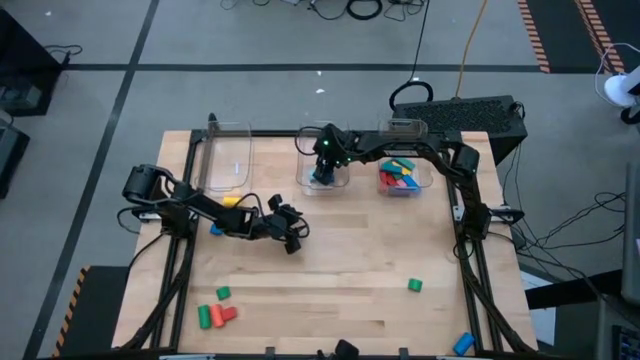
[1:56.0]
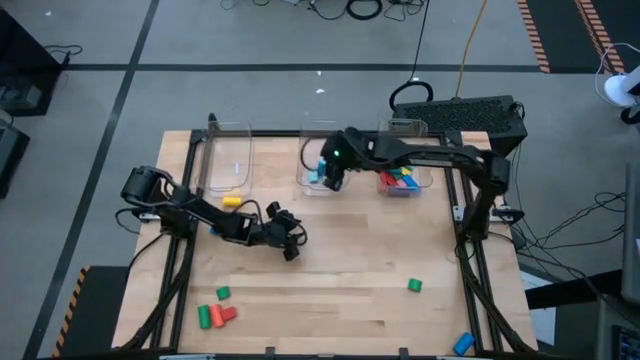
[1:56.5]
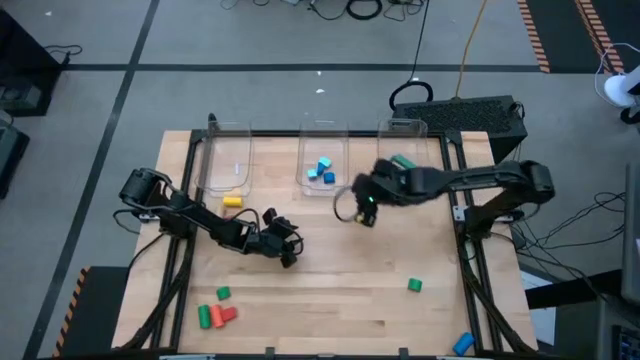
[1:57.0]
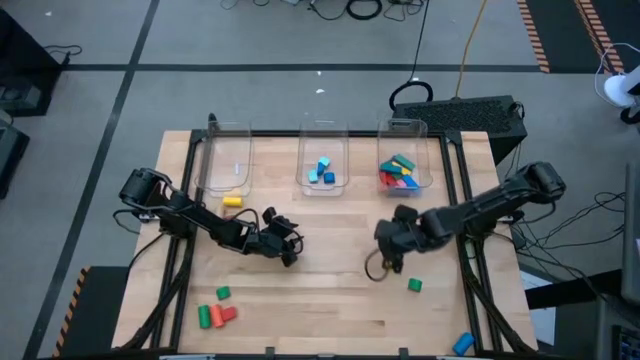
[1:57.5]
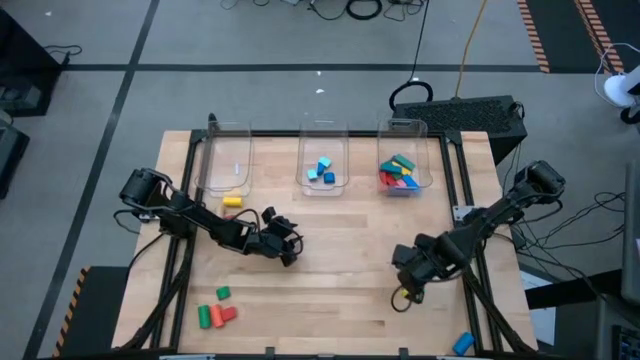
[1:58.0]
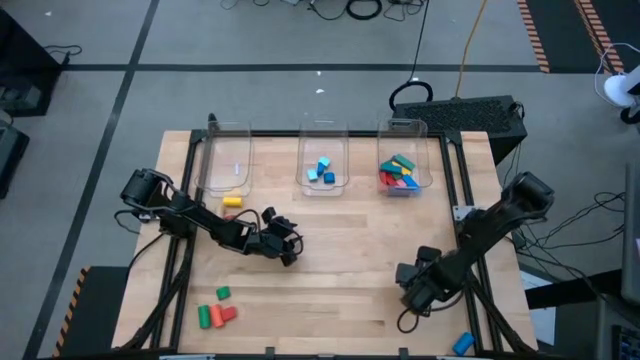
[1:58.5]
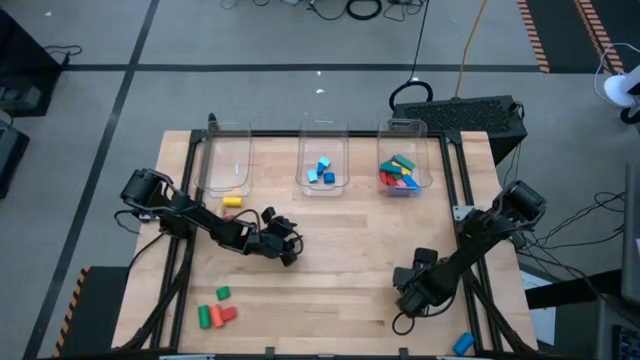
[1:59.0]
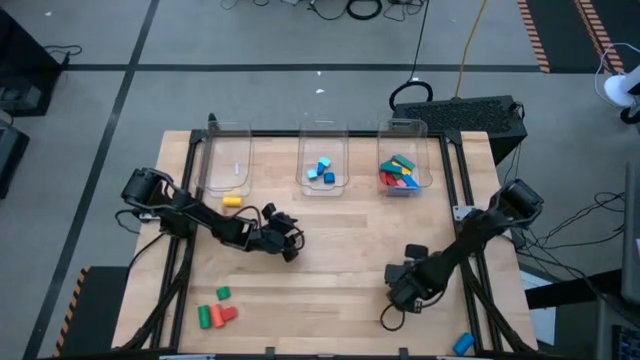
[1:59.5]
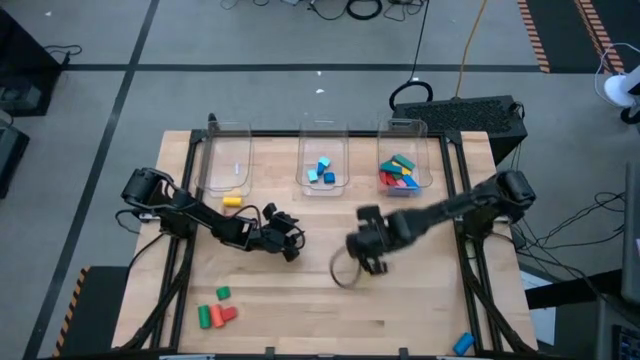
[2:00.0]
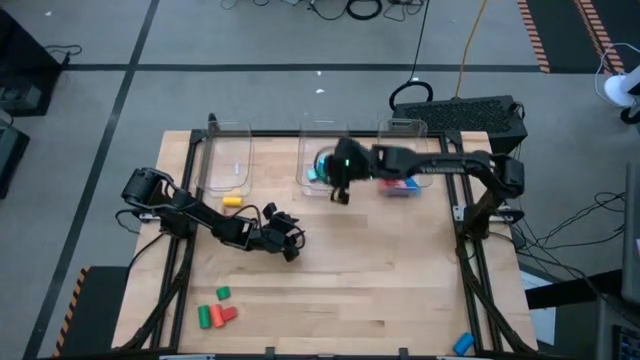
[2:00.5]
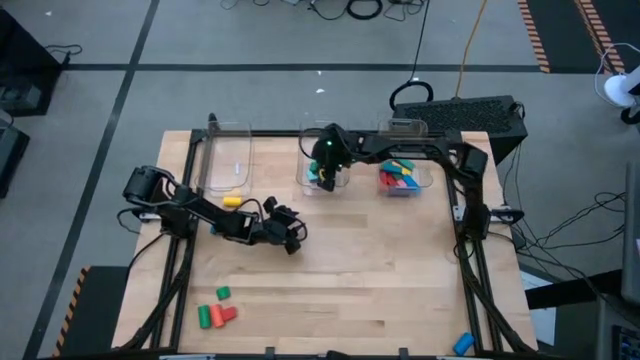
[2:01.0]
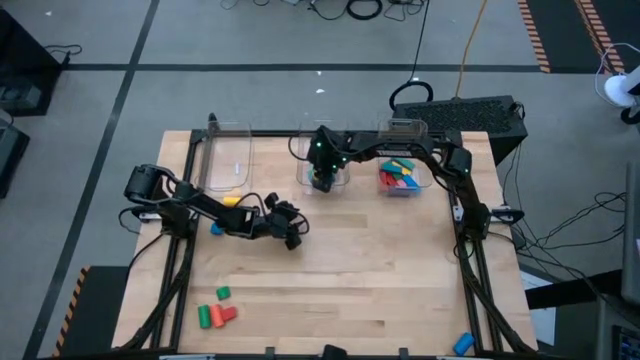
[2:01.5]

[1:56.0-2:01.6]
Task: Sort blocks by size
Put the green half circle block into the center transparent bin

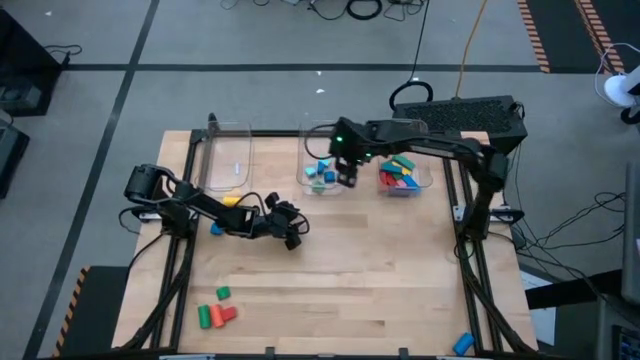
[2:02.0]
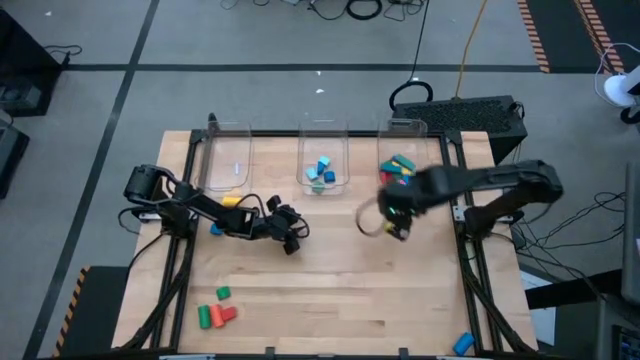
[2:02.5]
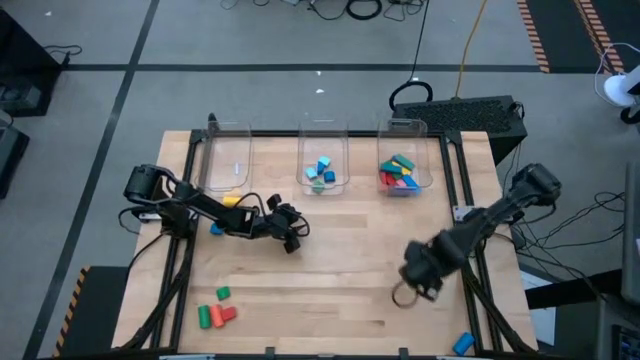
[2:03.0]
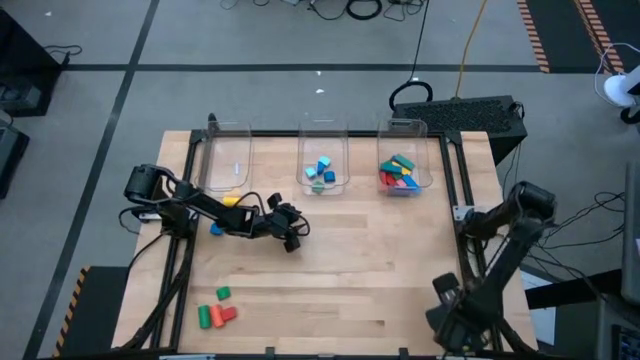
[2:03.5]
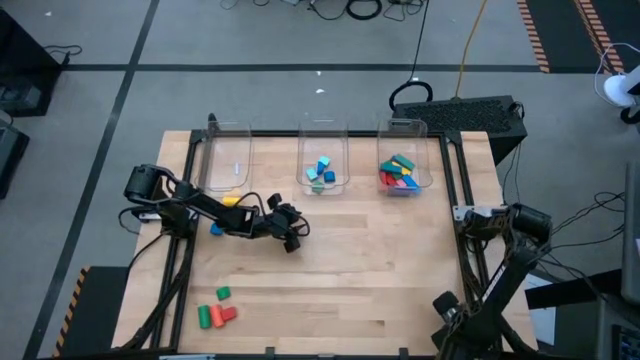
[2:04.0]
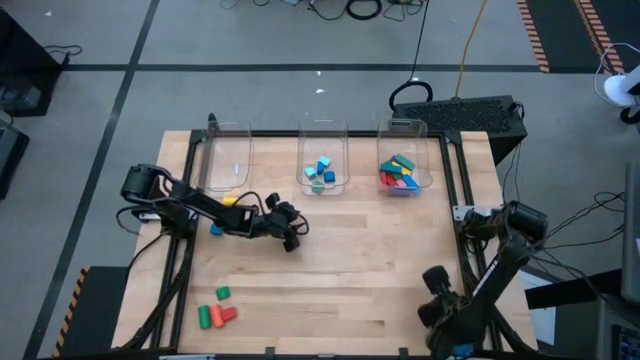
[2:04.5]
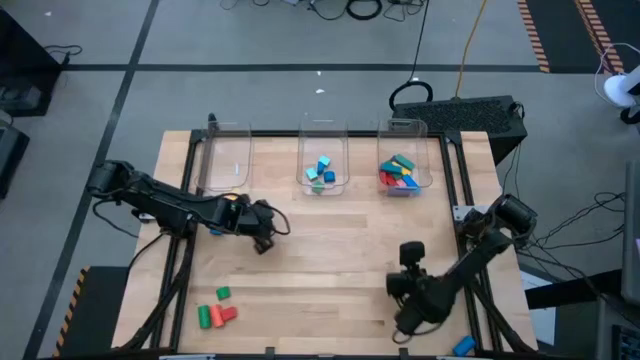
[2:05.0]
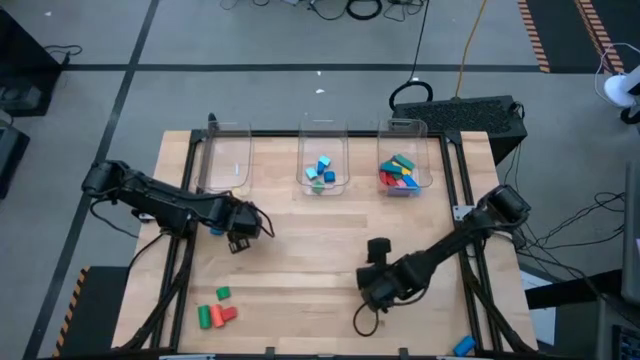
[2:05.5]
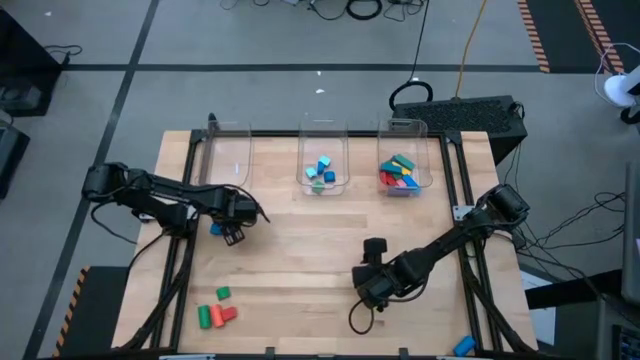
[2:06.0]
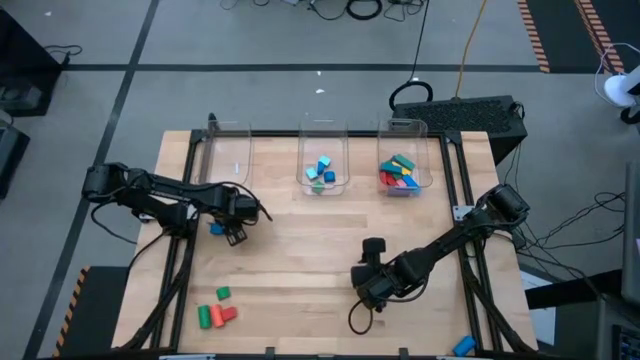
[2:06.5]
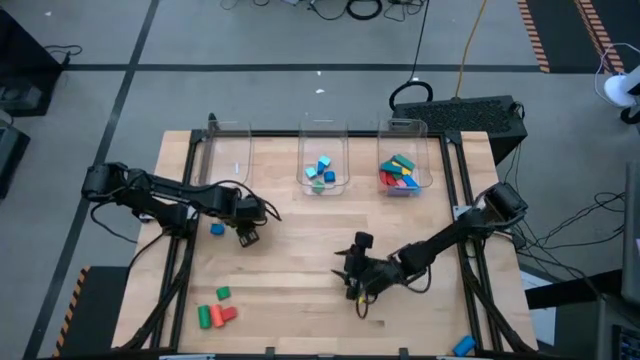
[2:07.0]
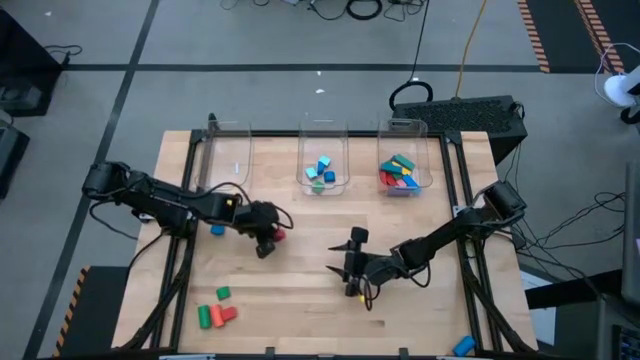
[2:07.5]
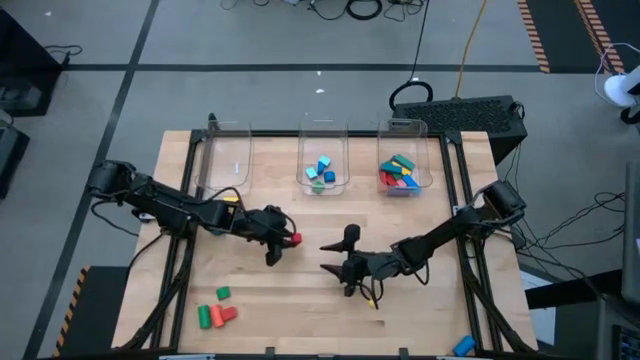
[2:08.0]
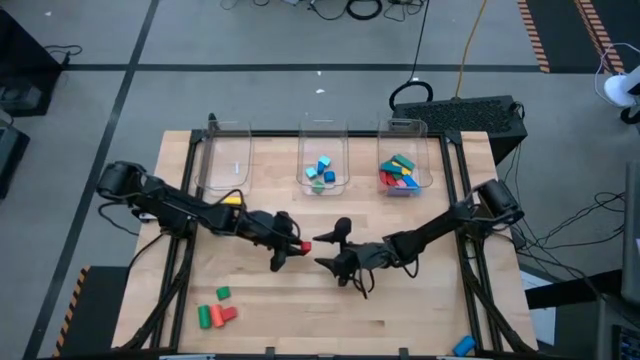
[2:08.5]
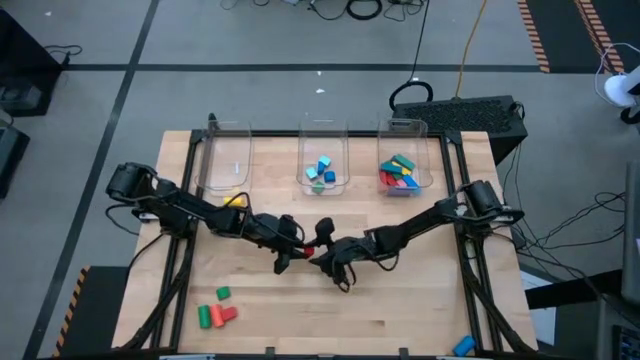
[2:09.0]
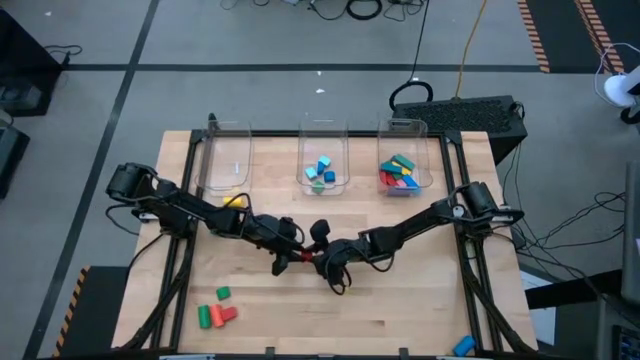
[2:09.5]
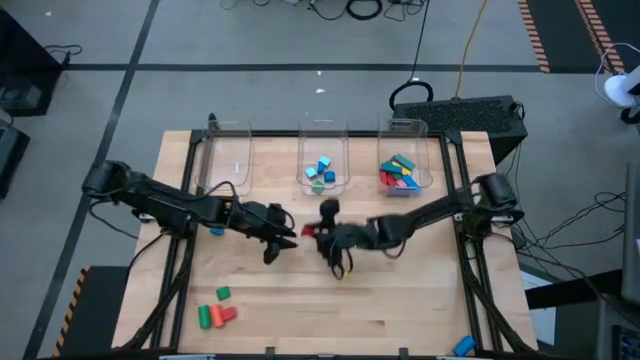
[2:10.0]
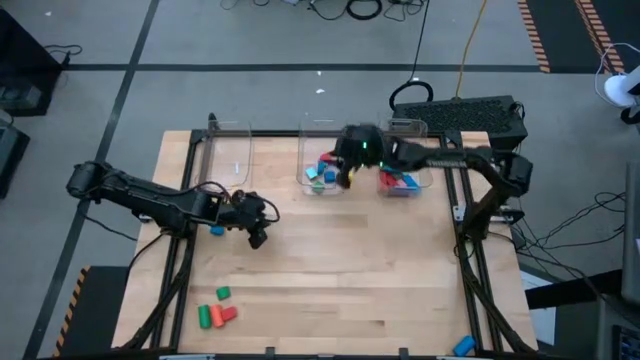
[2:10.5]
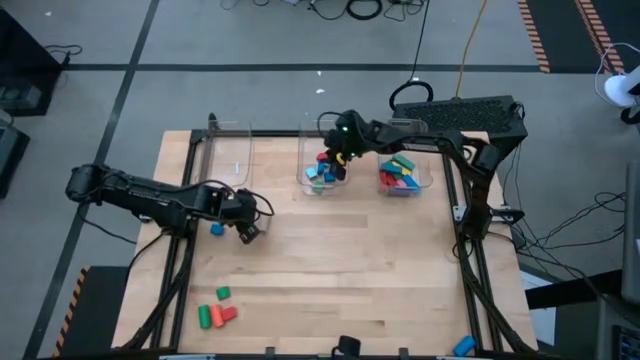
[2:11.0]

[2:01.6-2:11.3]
Put the red half circle block into the center transparent bin

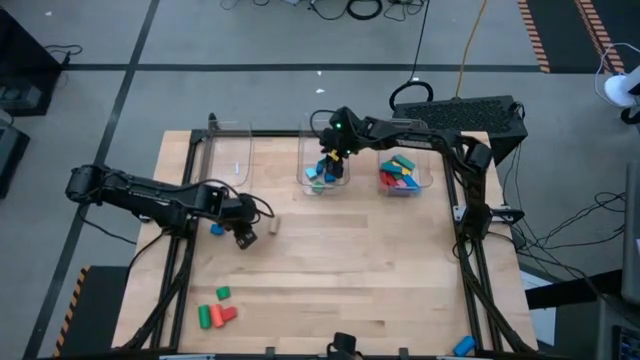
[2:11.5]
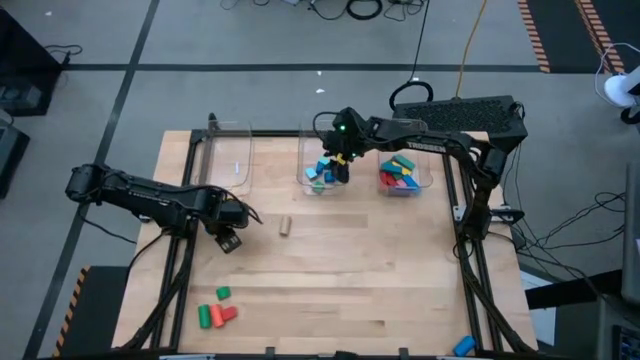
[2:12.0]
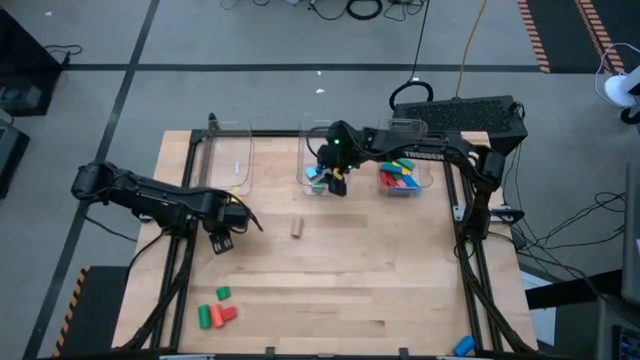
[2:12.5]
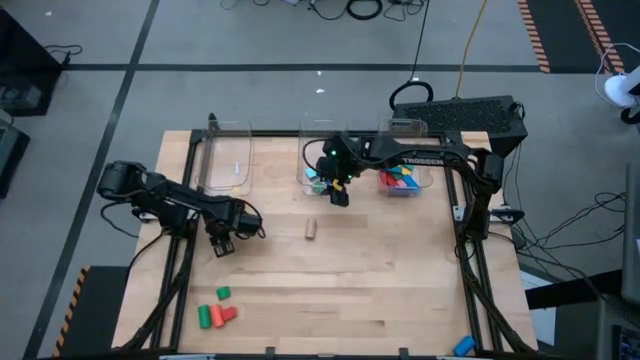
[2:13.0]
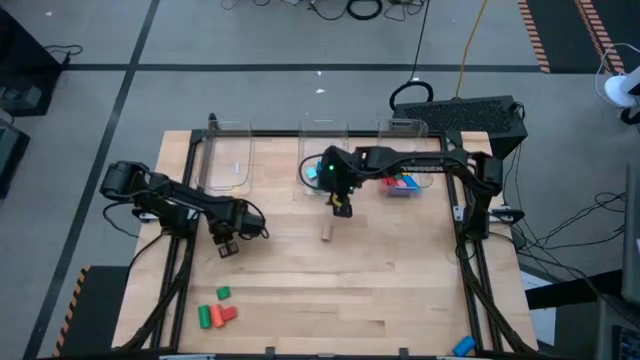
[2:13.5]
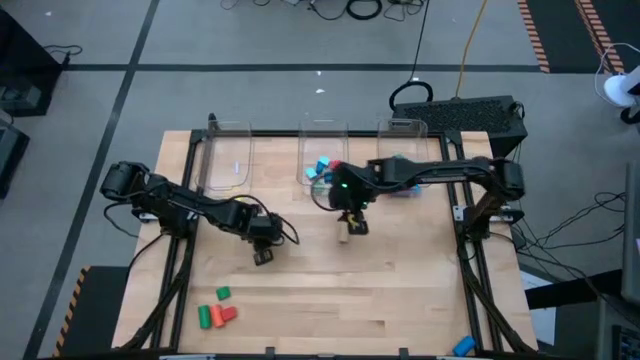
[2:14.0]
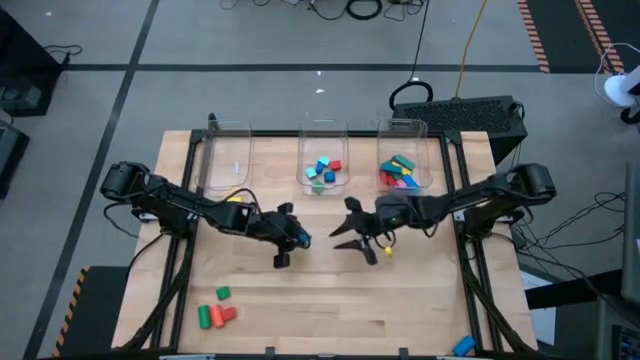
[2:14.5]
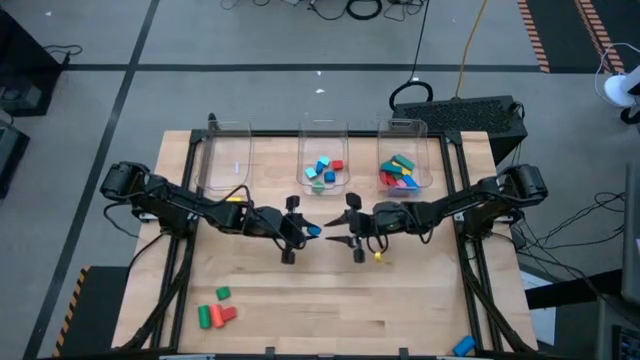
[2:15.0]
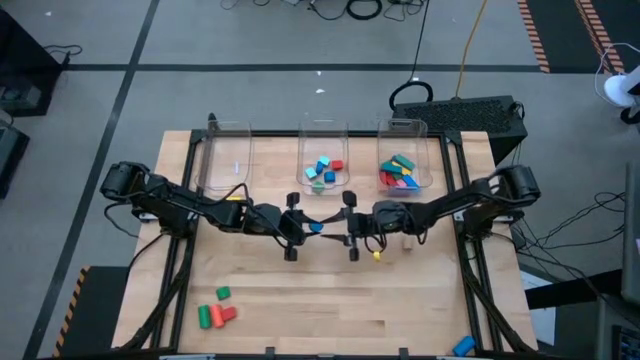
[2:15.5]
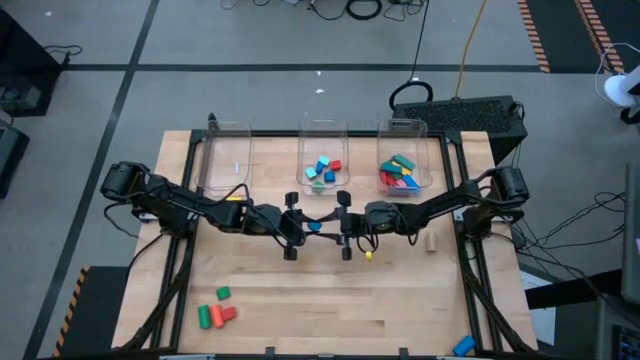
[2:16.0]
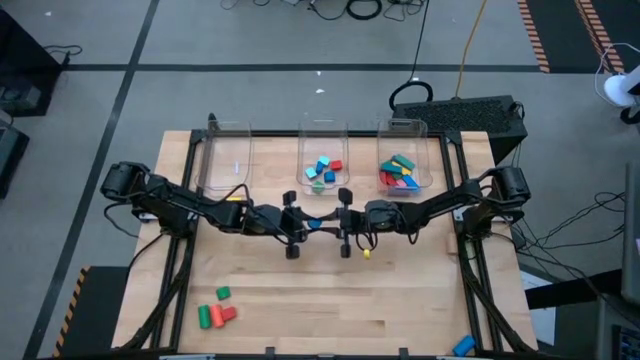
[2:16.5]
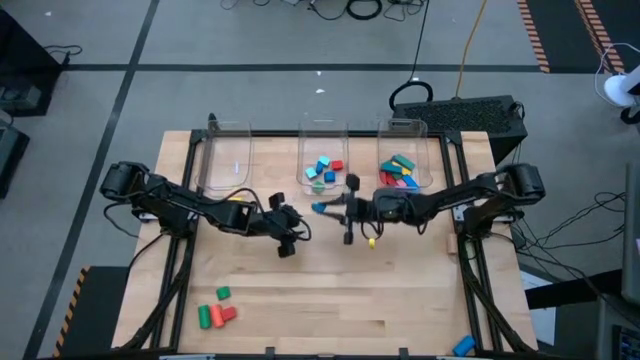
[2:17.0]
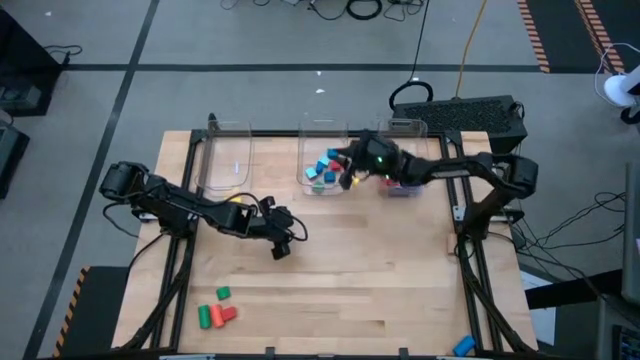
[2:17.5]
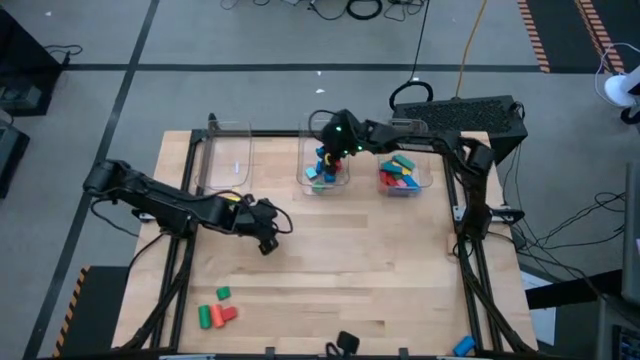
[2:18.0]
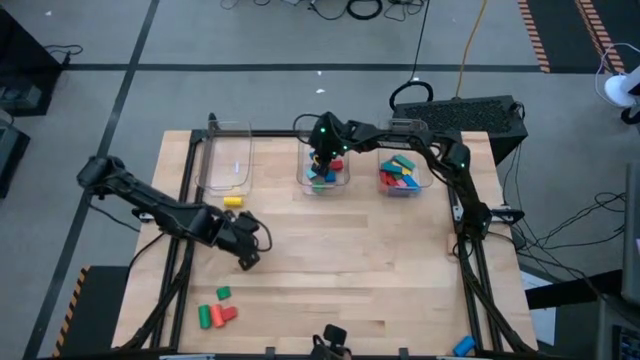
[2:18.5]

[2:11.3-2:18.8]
Put the blue half circle block into the center transparent bin
